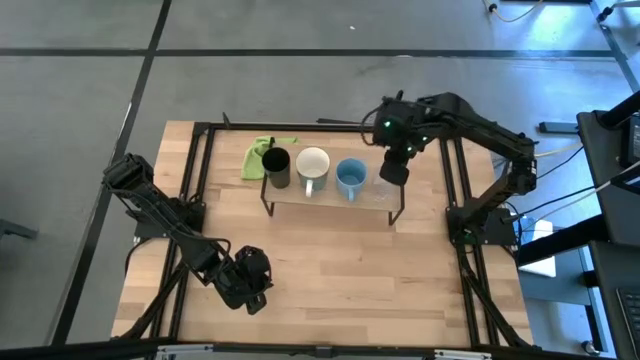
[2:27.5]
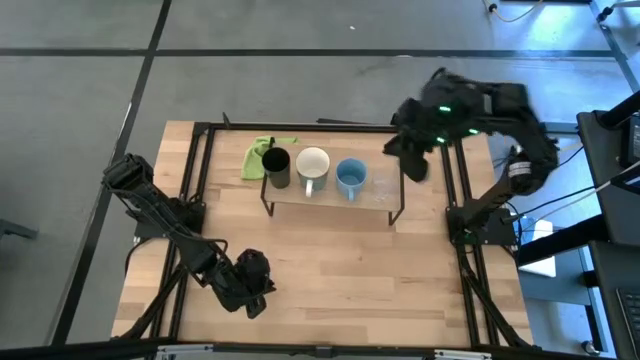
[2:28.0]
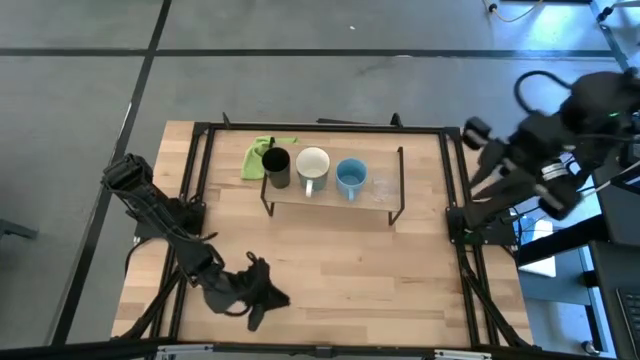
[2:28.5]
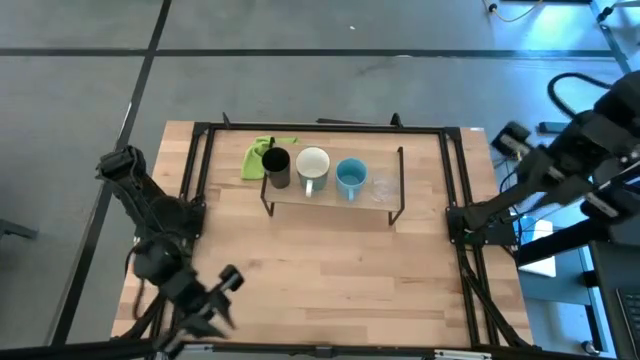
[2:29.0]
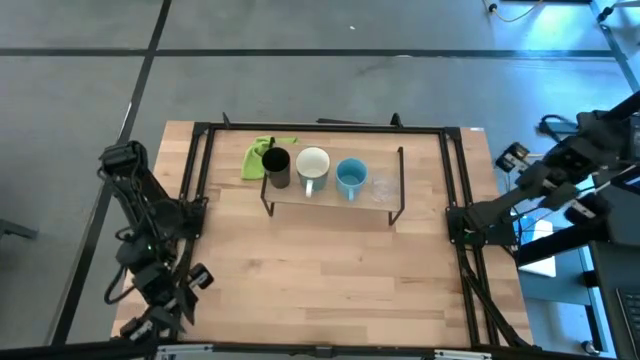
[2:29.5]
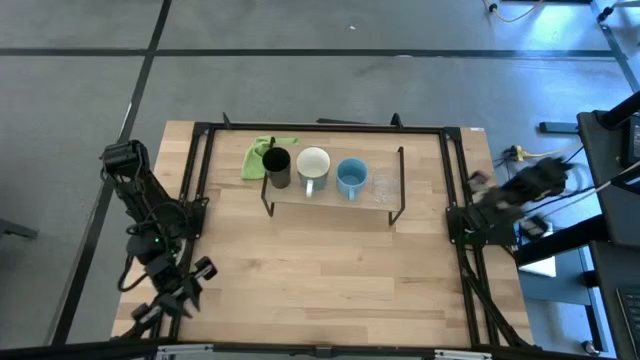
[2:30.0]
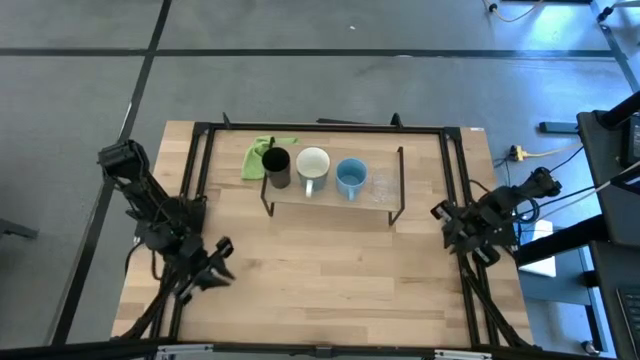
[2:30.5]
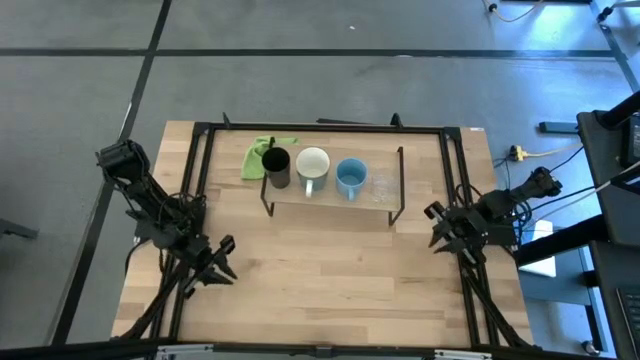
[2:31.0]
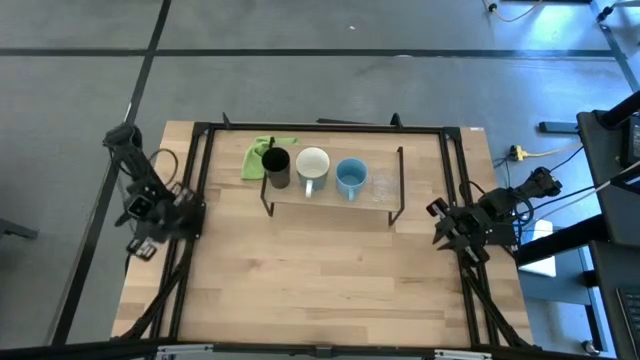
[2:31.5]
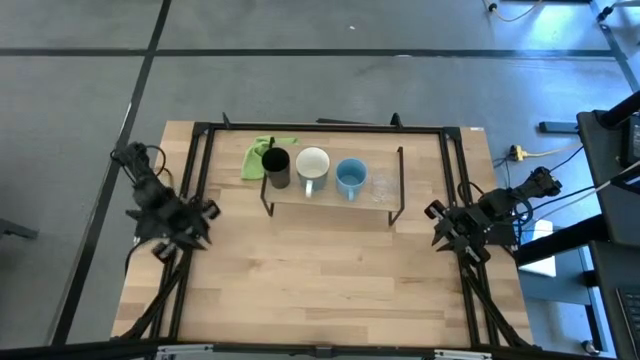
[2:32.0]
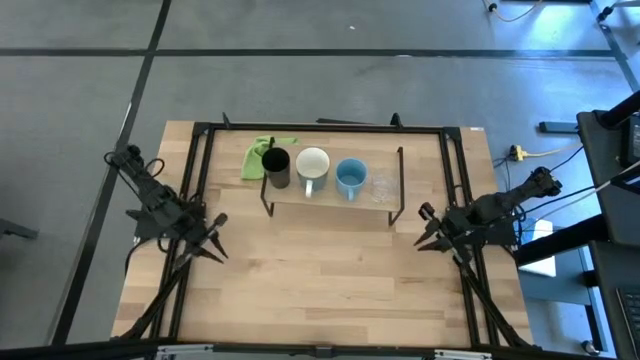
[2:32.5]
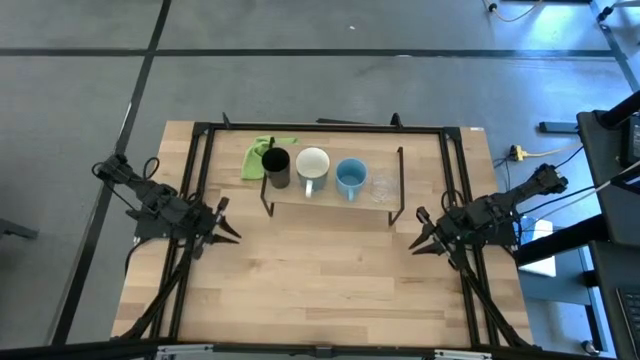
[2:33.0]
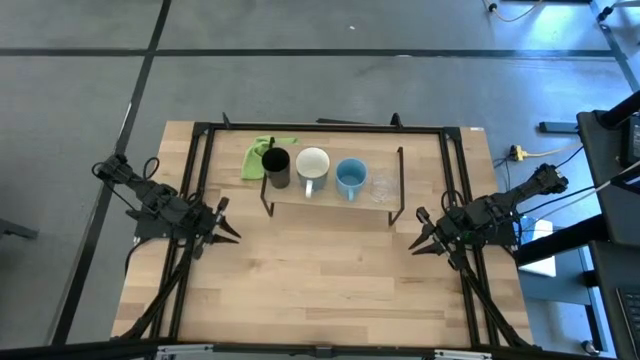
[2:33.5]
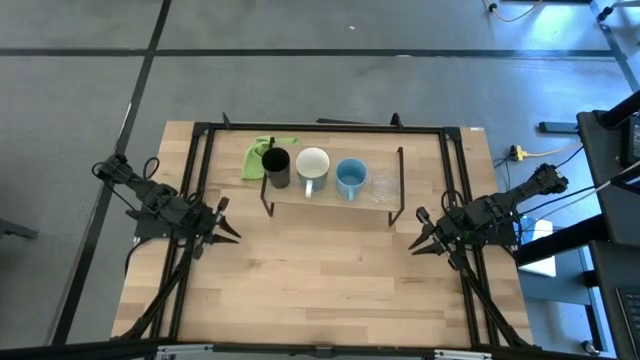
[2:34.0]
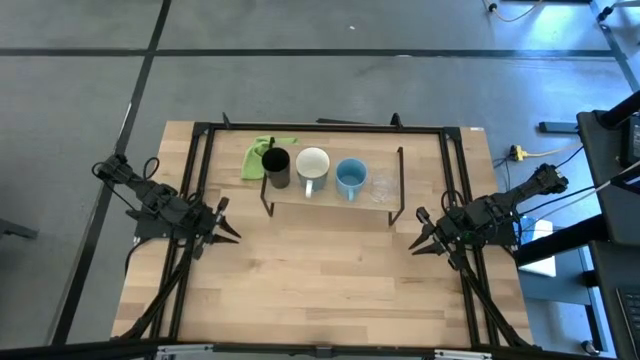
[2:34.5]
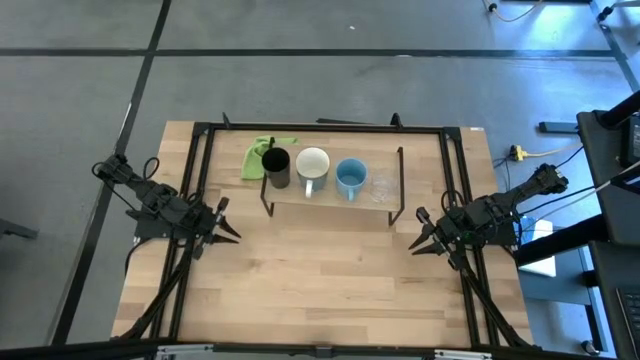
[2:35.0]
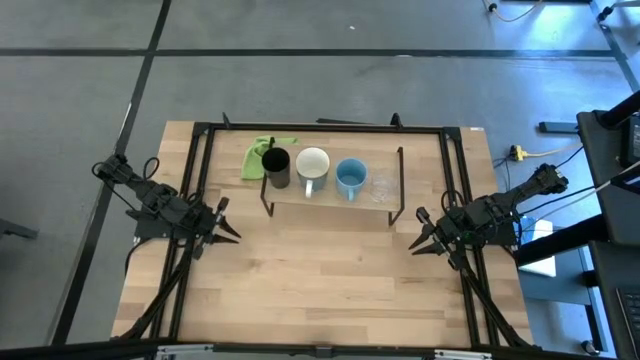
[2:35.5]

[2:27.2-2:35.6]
Task: Stack small to large cups/mugs on shelf
Return to Home Position

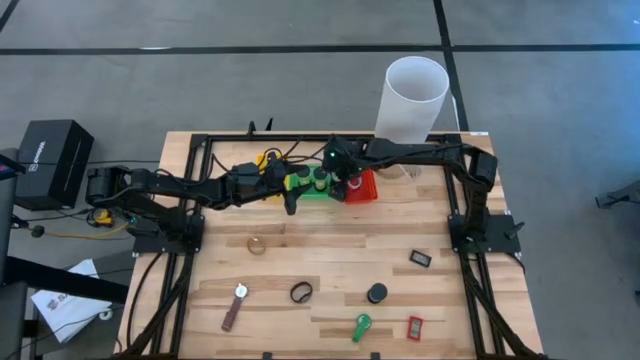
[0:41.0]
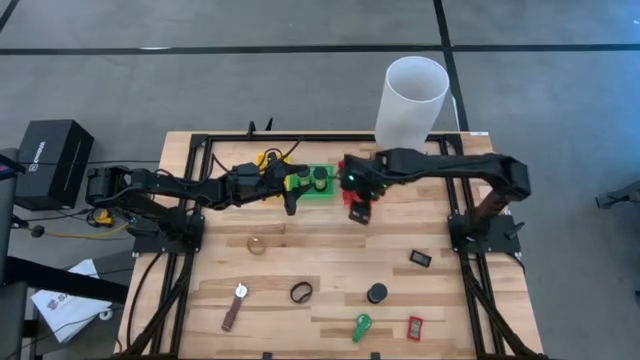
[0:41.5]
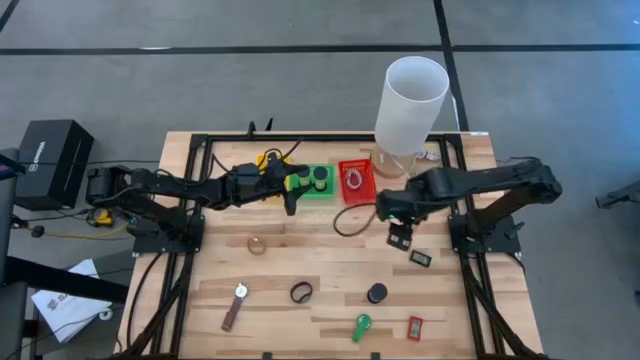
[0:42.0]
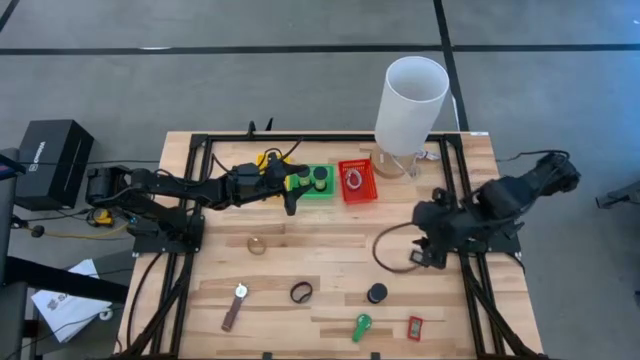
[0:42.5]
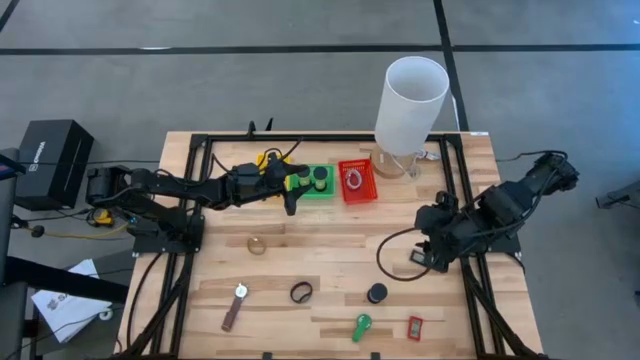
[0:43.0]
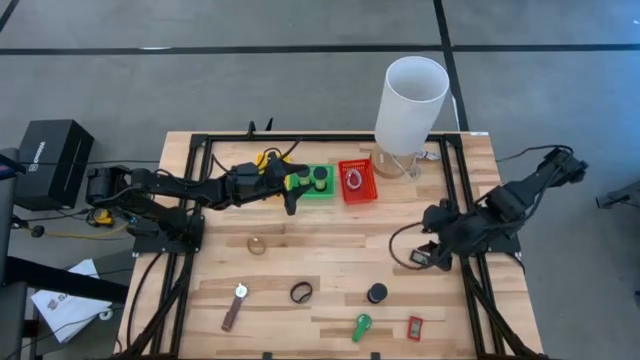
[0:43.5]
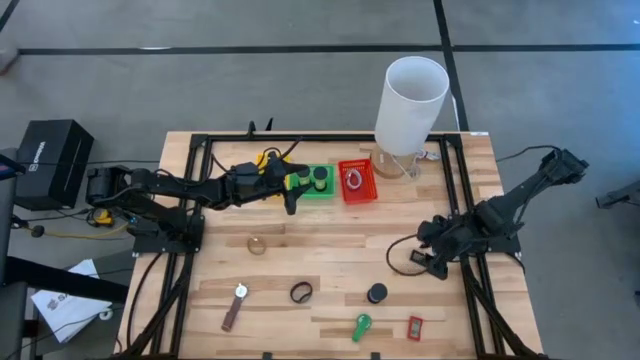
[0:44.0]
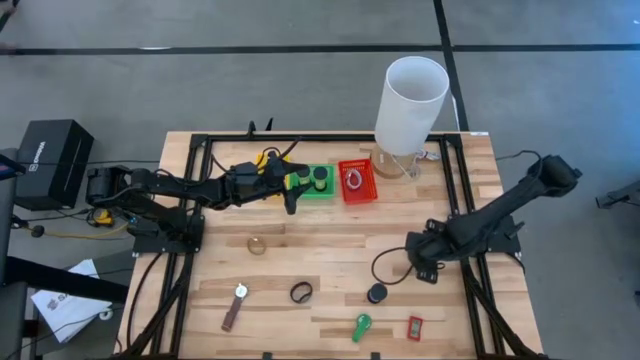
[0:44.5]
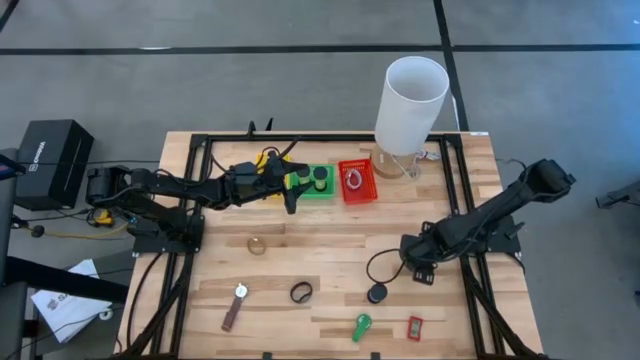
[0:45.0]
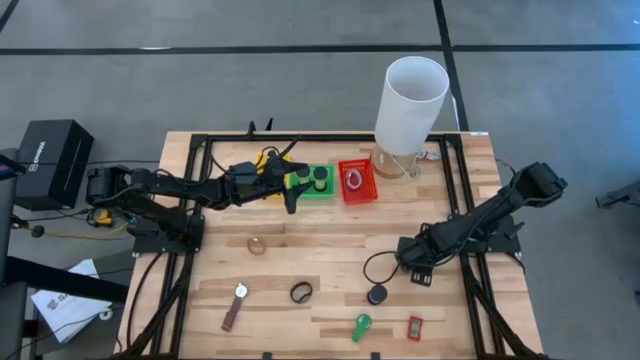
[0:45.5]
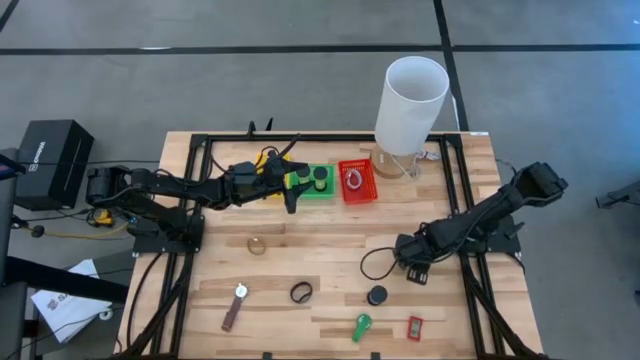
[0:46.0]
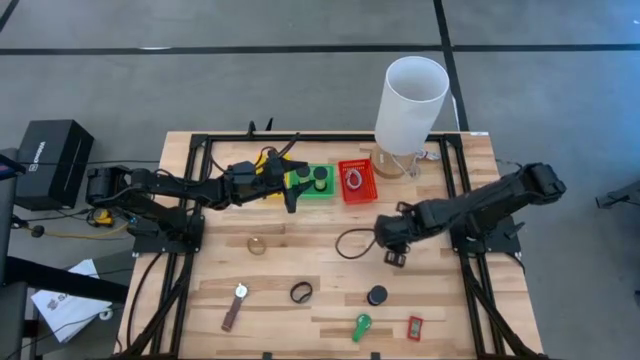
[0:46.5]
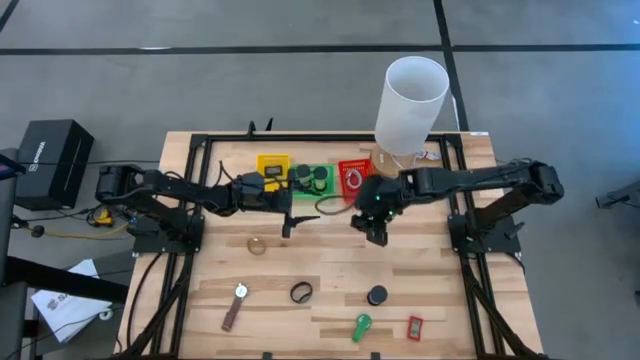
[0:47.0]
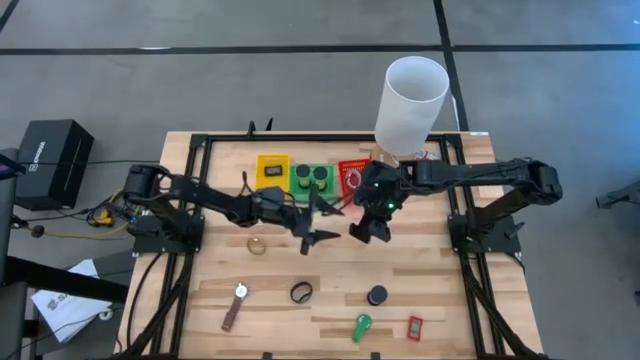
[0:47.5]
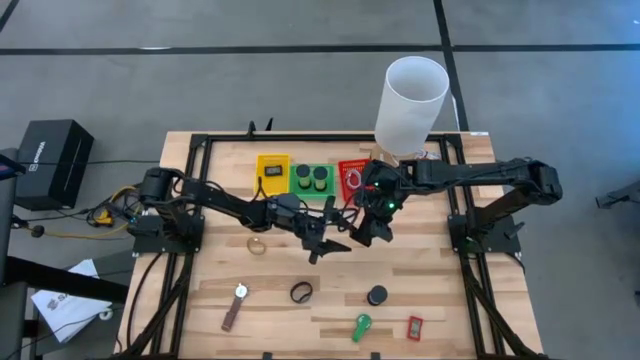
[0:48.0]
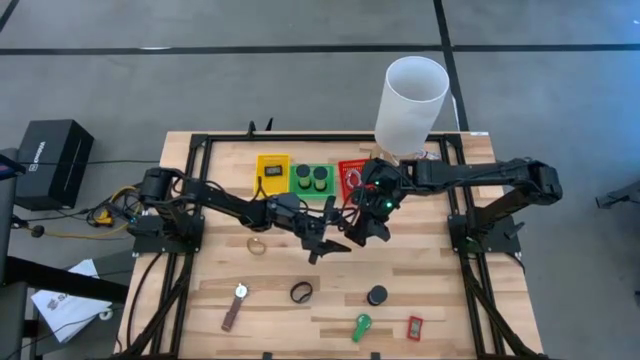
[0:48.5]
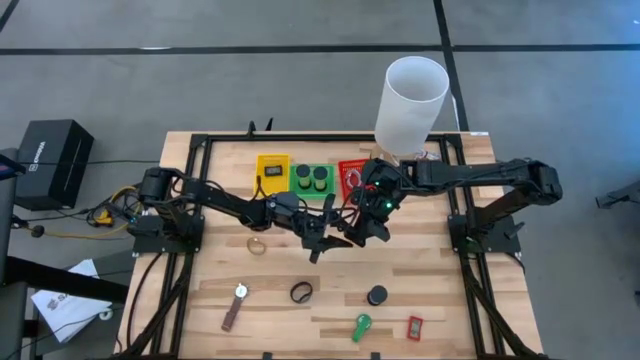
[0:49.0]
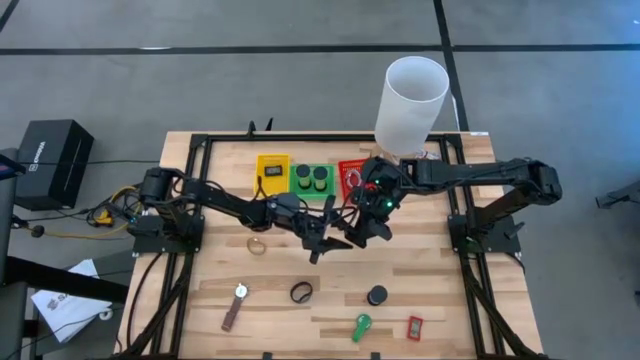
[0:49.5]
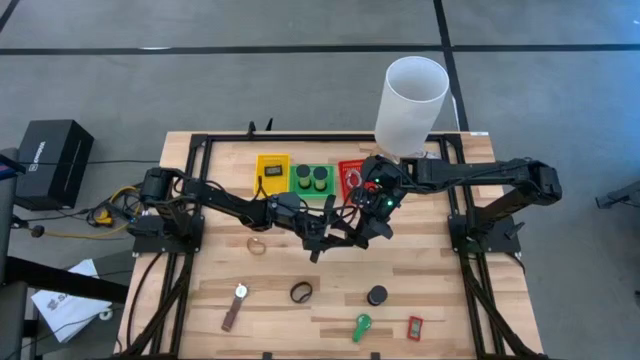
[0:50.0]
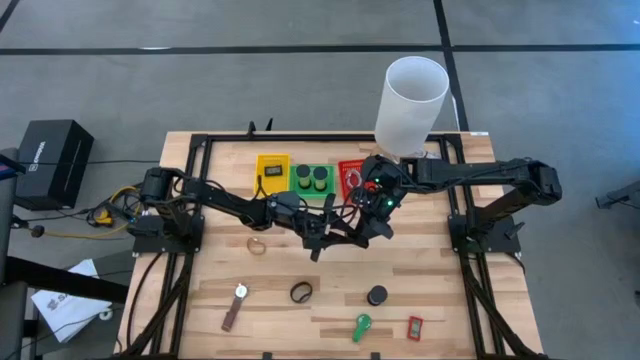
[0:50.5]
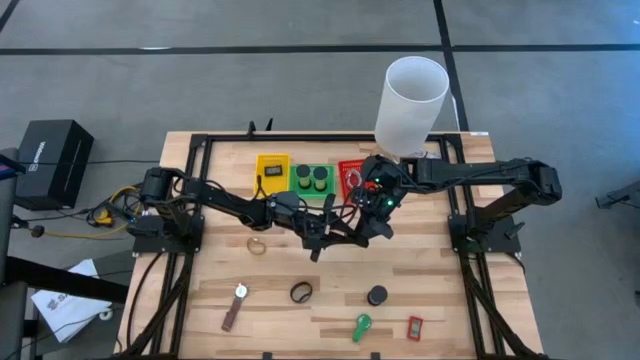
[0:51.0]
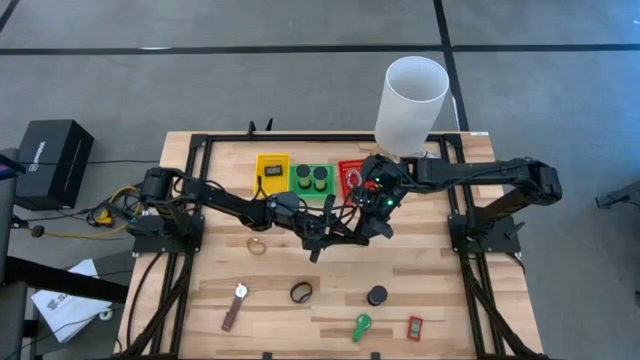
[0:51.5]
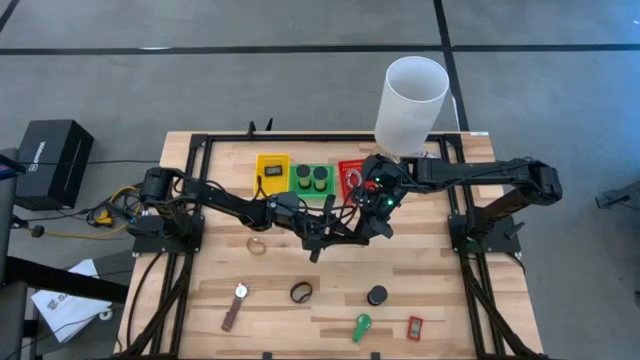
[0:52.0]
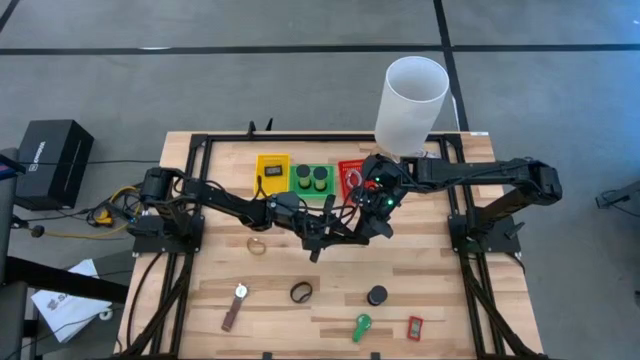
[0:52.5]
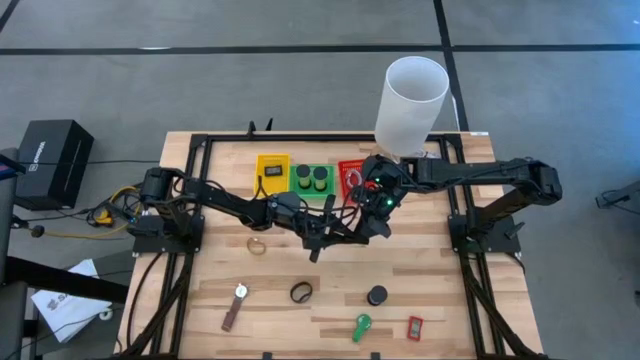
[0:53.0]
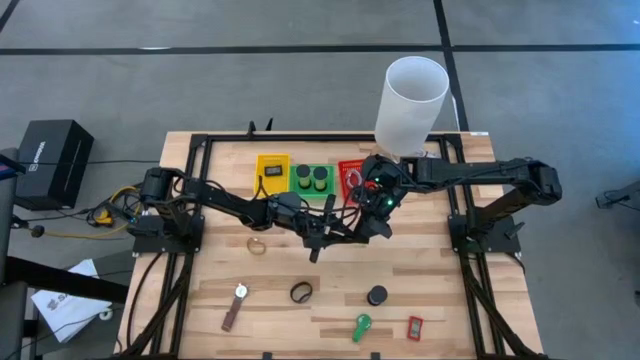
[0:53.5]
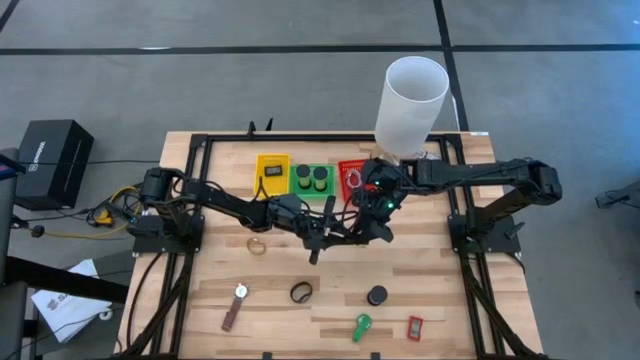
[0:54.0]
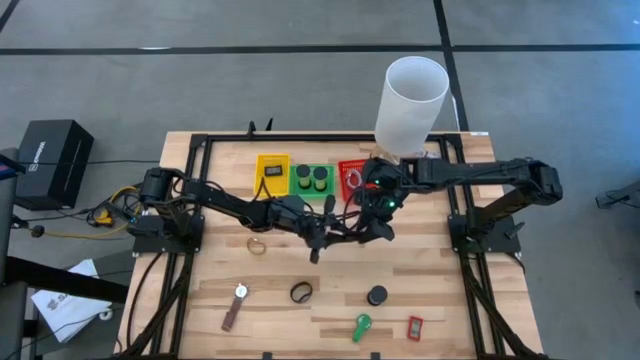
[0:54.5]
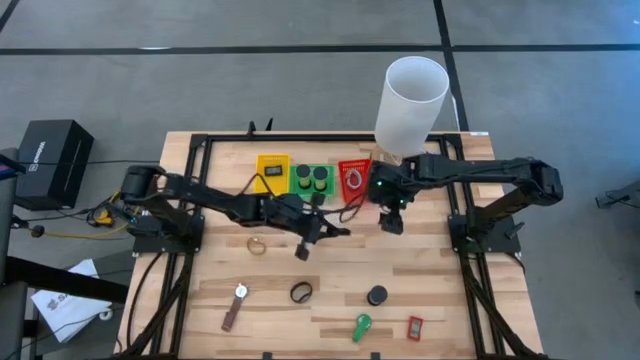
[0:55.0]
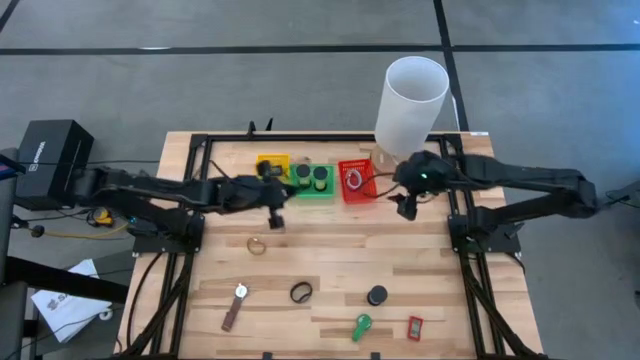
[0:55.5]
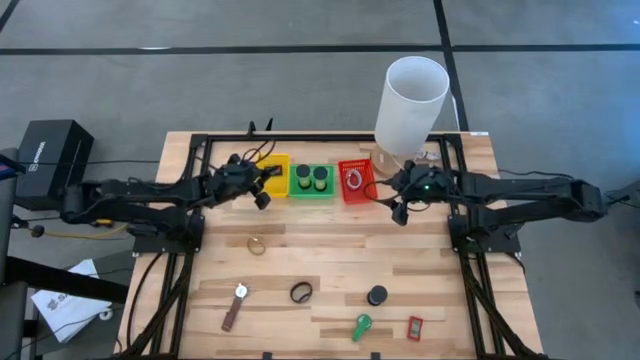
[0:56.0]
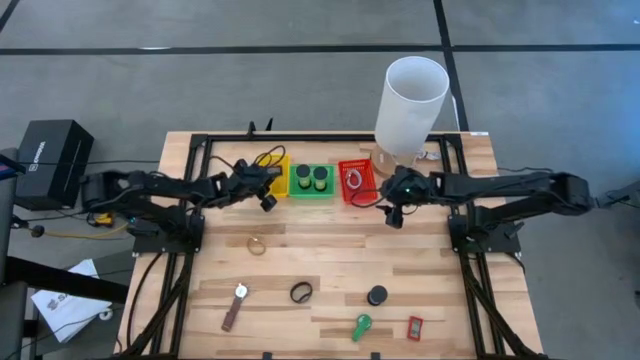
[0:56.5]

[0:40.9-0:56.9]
Task: Pick & Place Office items
Put the black digital clock into the yellow basket
